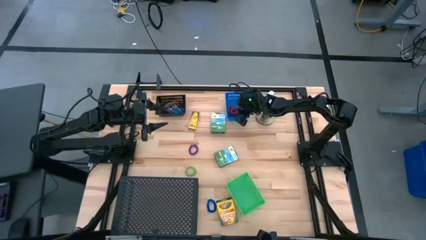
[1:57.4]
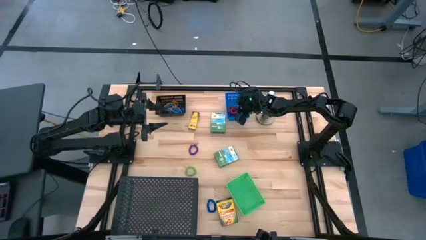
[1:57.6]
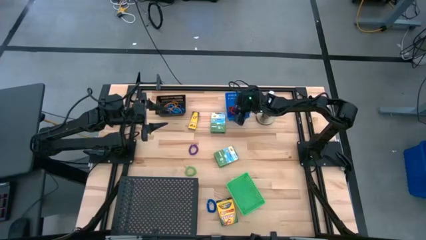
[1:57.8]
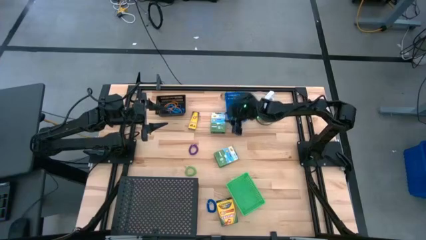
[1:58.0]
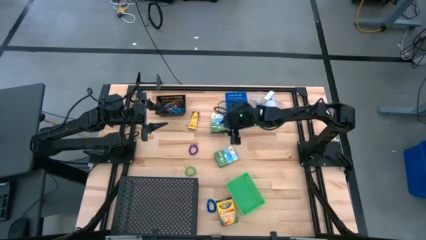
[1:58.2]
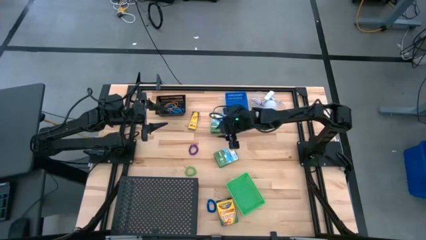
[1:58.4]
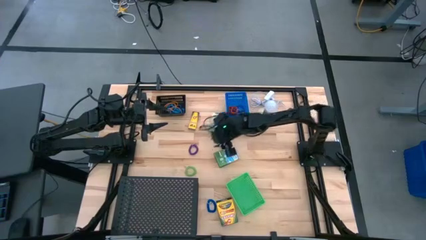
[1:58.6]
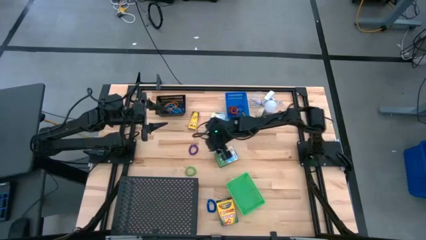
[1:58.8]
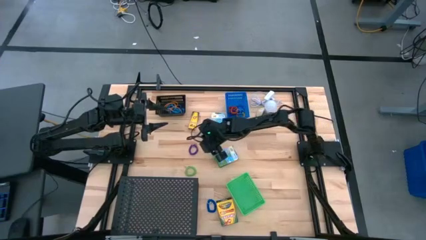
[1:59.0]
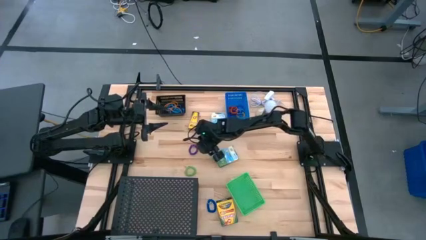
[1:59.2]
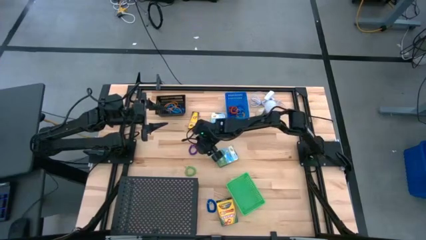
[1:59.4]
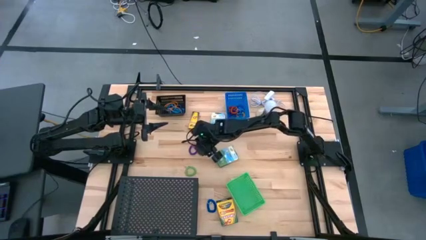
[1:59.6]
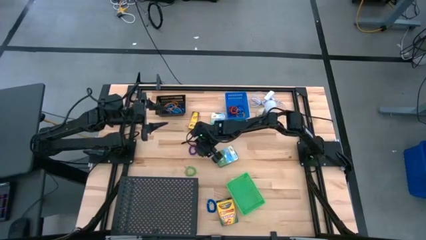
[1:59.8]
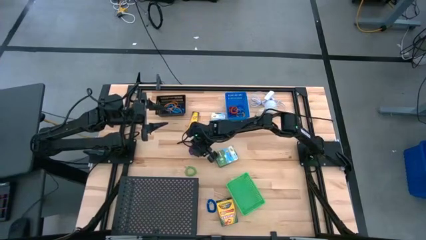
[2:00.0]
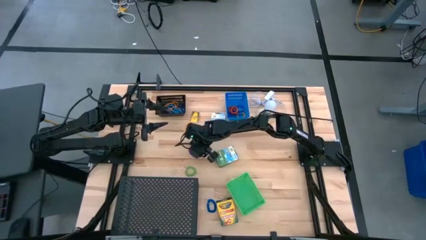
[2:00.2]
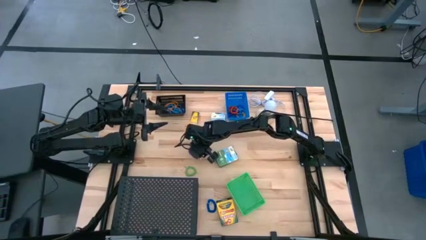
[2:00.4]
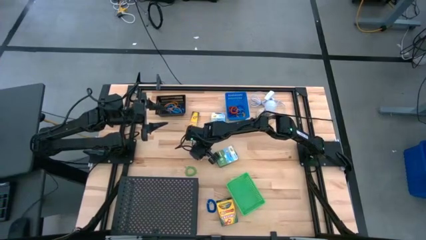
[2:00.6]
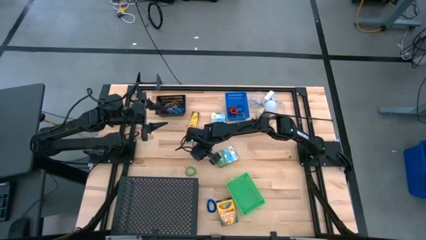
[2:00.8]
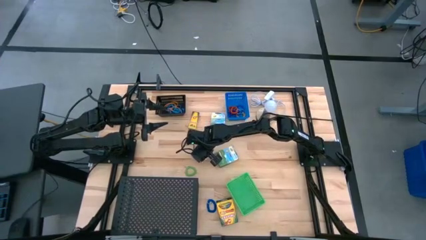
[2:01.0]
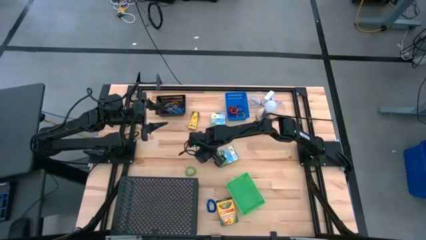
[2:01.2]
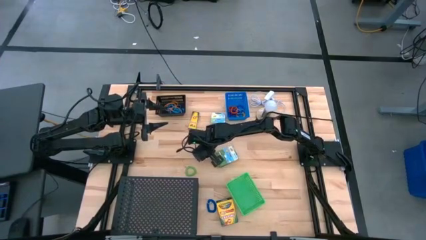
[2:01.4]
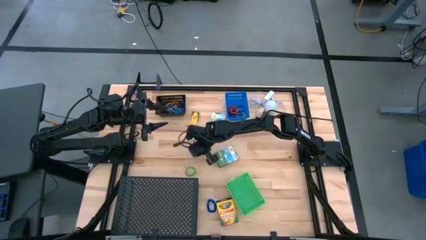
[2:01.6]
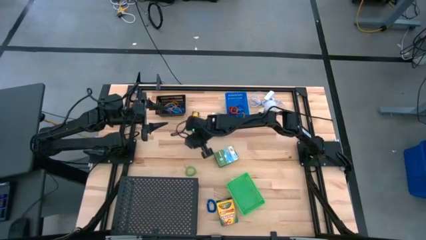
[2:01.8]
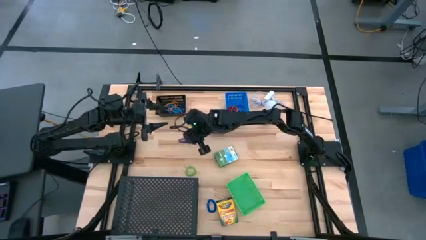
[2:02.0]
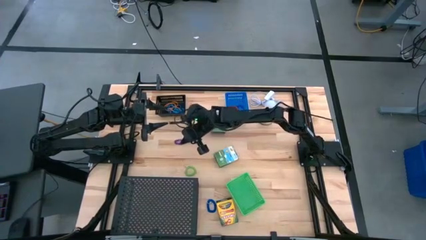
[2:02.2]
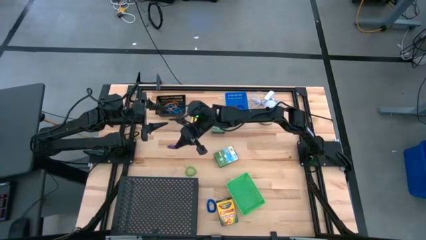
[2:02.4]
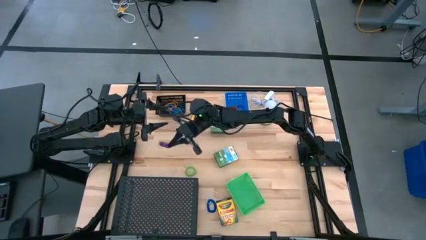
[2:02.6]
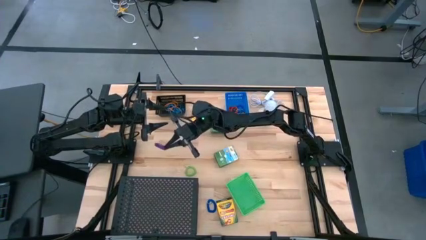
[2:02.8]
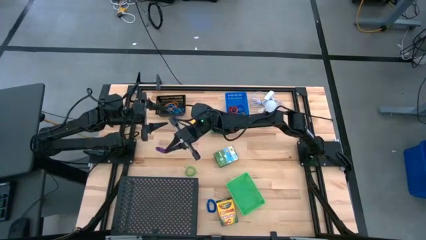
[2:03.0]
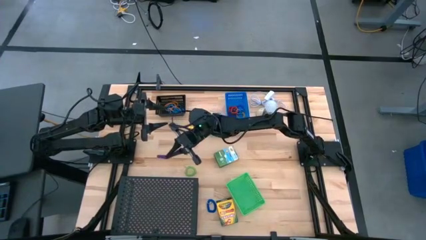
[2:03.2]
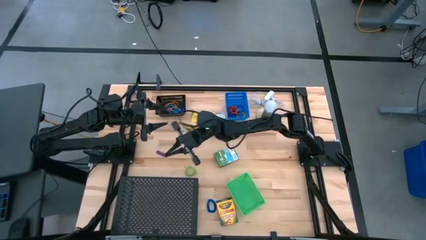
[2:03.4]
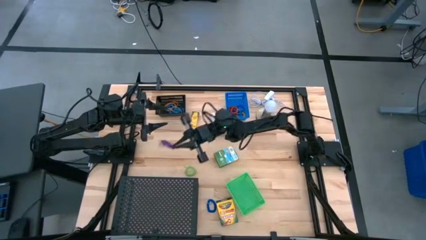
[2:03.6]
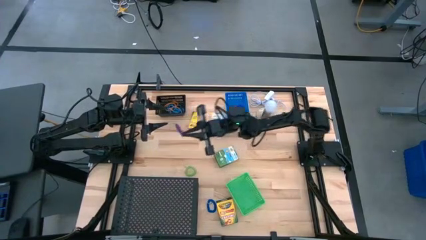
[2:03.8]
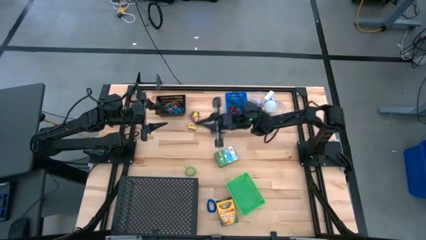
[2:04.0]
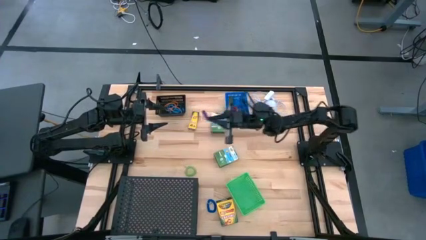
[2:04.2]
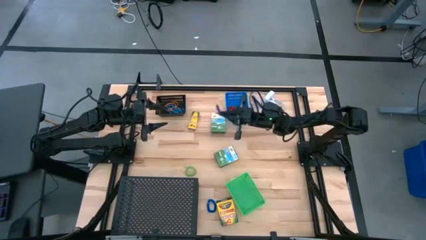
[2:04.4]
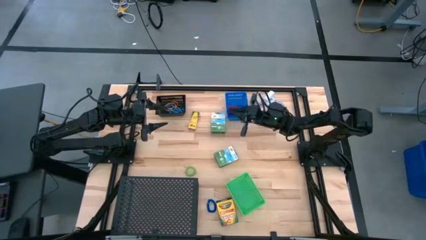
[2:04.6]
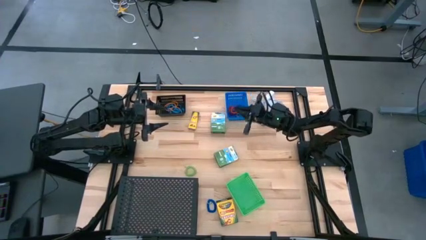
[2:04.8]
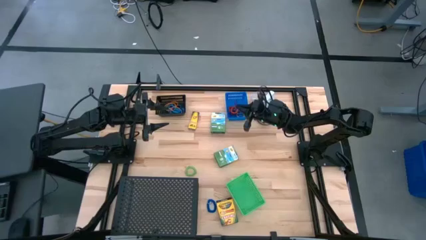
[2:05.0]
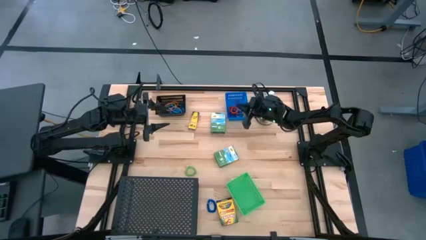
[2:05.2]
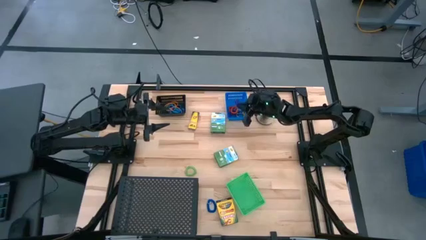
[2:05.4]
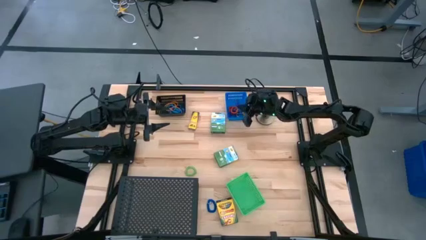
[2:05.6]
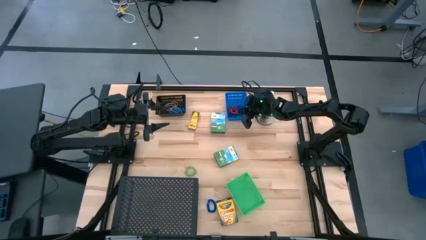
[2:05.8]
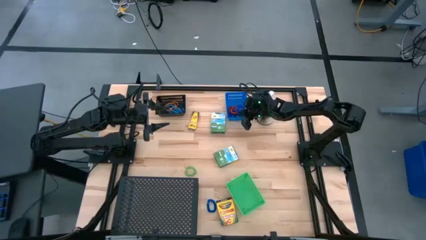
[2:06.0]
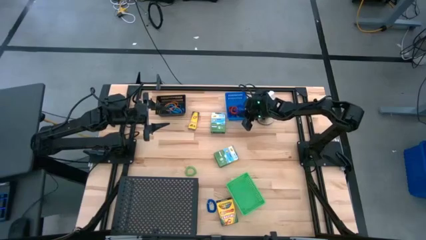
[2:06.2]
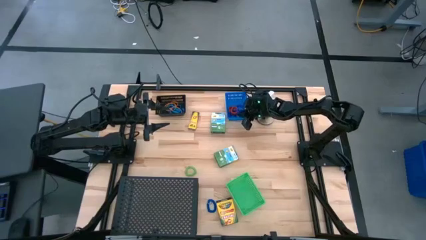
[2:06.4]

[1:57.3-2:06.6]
Task: Pick & Place Office Desk Supplies
Put the violet spring keychain into the blue bin

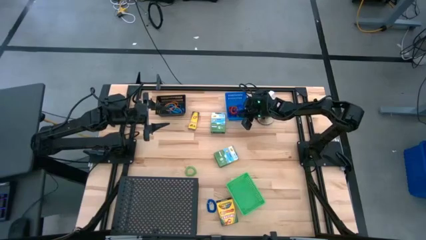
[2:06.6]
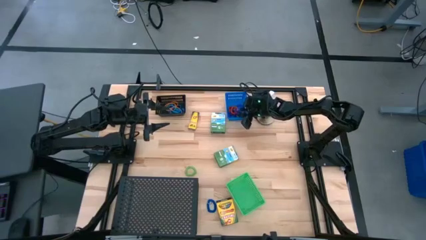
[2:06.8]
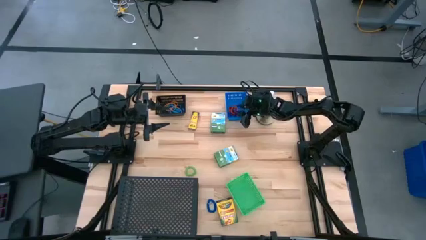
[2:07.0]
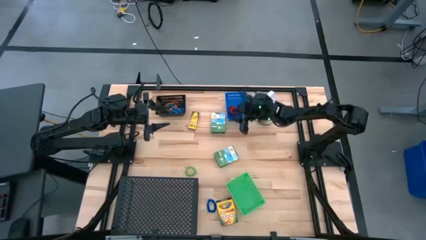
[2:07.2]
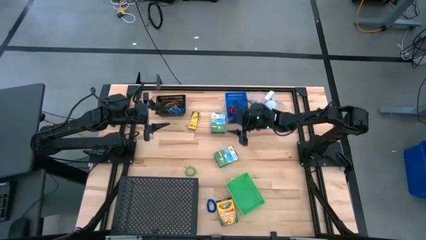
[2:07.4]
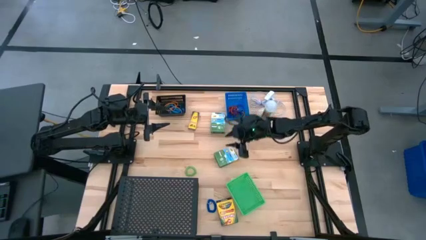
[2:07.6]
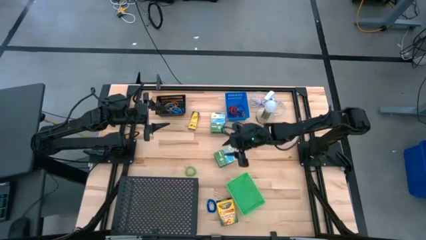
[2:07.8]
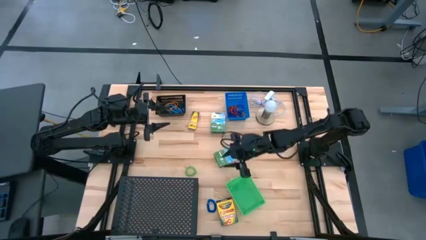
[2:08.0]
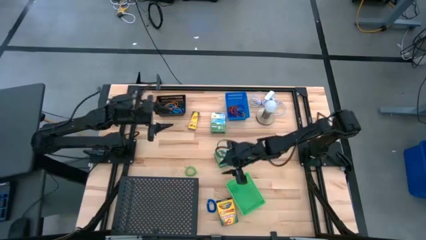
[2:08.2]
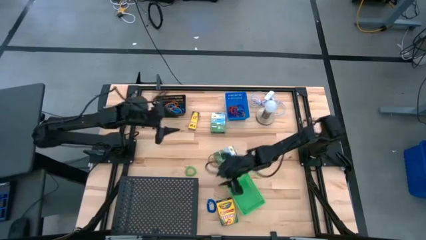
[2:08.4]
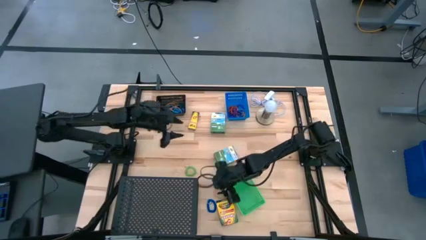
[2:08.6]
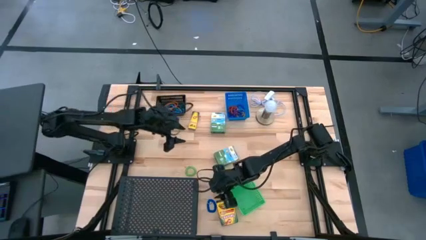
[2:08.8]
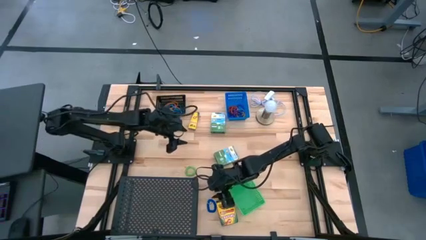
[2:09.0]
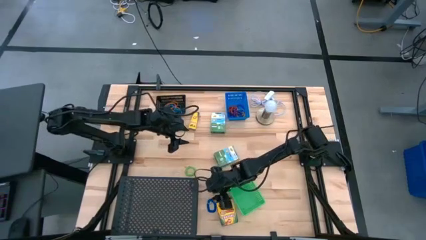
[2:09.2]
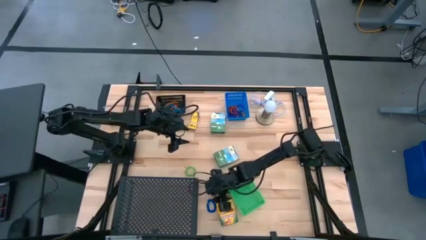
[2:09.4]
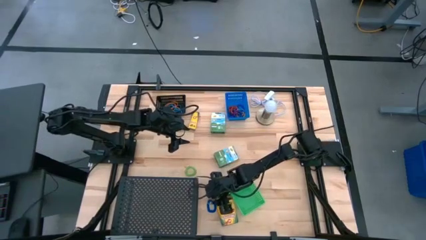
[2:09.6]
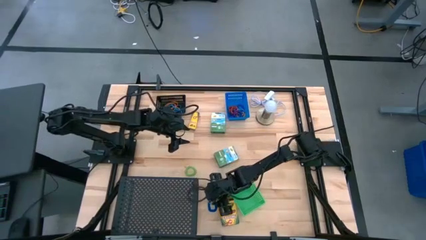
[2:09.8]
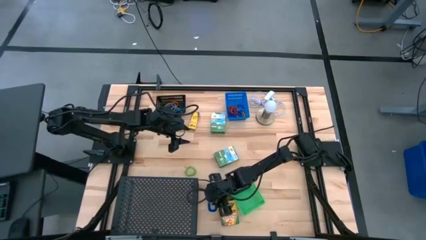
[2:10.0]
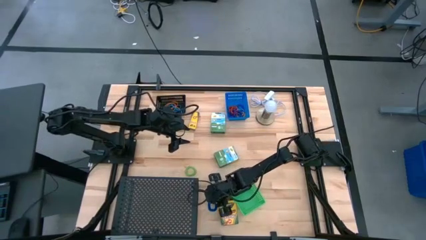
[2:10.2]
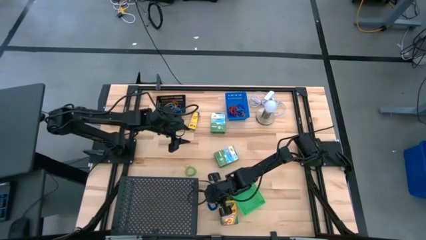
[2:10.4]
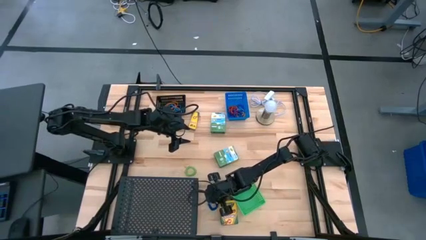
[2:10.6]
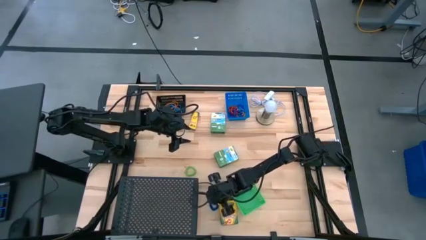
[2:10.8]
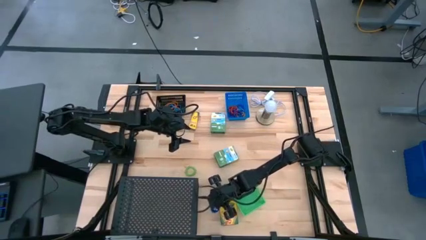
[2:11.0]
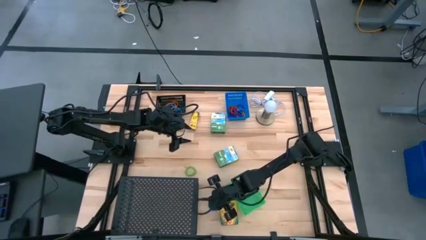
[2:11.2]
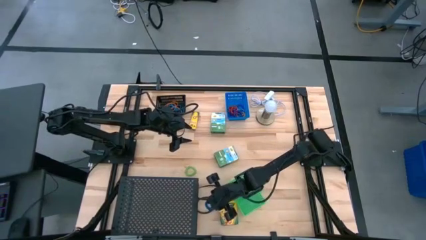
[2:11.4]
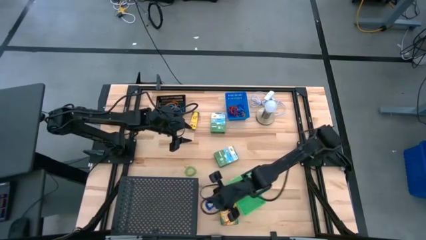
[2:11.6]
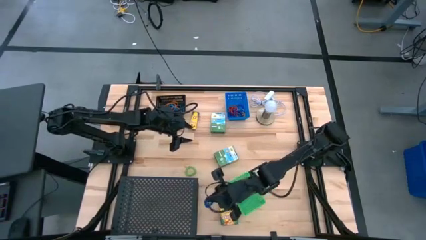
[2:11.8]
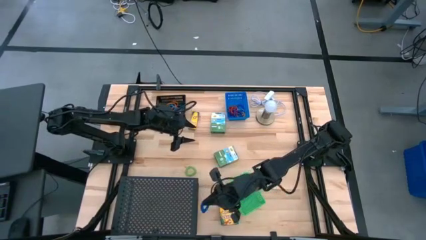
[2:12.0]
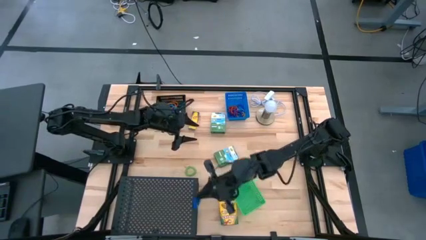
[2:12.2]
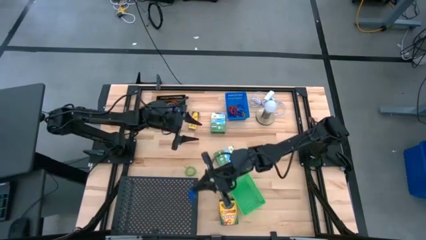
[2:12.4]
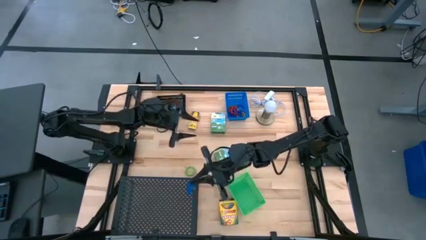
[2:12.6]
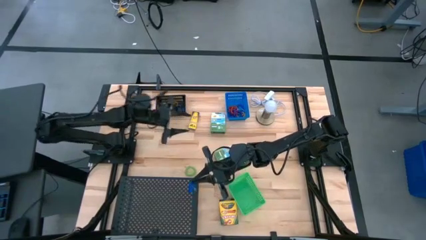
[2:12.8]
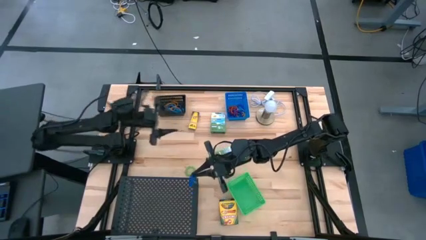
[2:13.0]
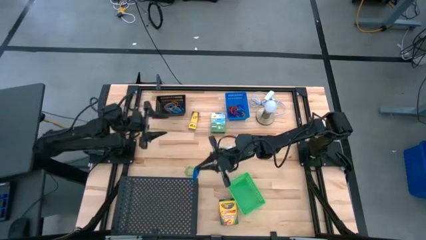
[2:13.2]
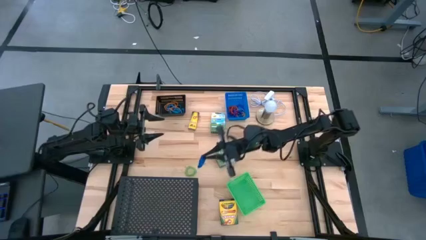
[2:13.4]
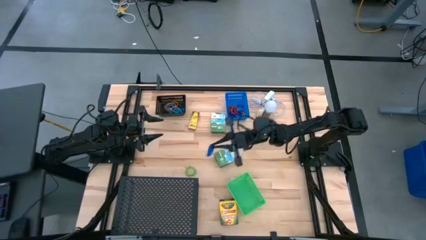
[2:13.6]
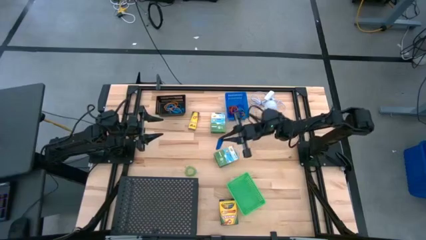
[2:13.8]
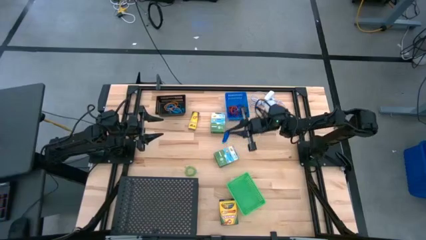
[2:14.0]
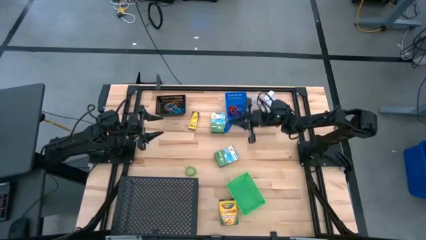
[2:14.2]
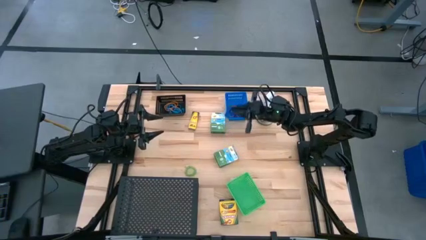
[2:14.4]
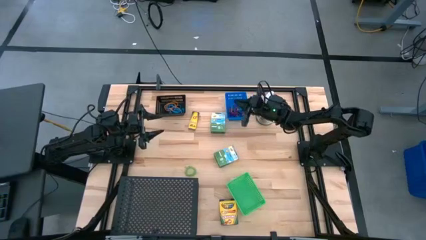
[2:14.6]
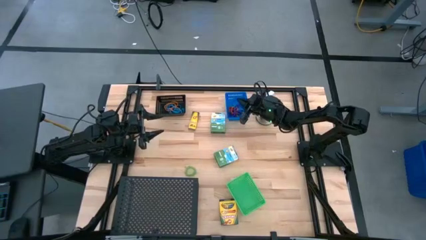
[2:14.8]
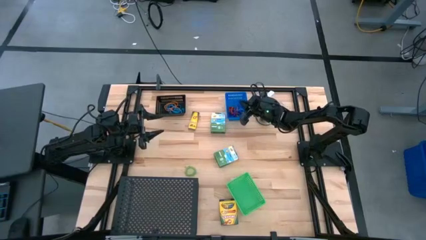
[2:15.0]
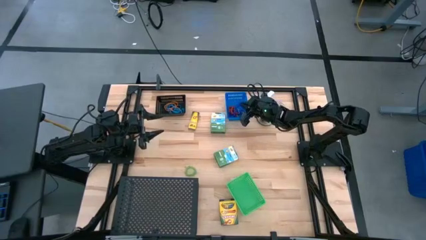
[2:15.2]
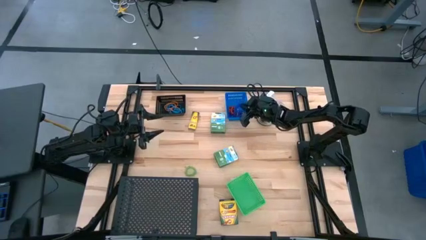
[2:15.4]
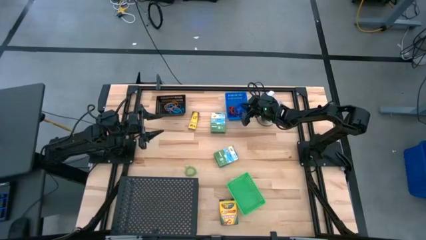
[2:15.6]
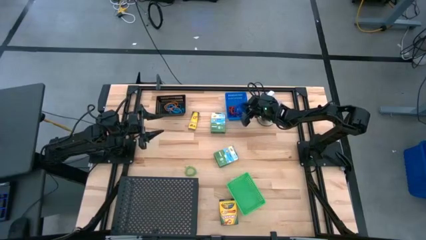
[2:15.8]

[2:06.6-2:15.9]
Put the blue spring keychain into the blue bin
